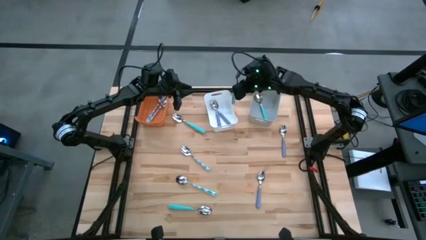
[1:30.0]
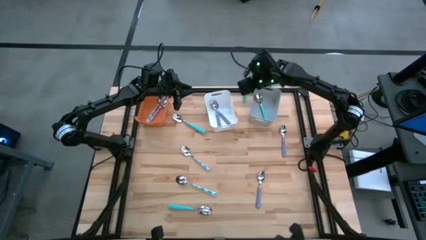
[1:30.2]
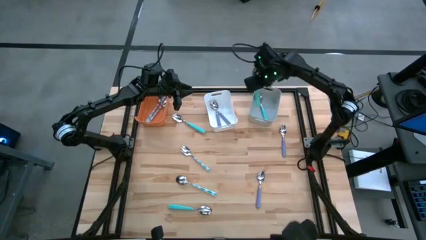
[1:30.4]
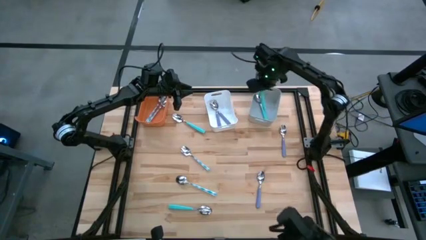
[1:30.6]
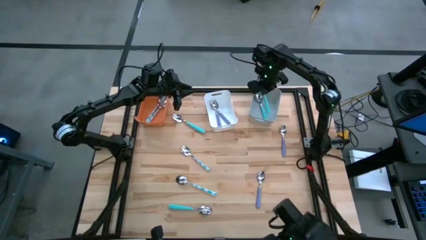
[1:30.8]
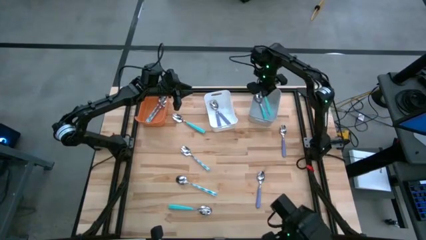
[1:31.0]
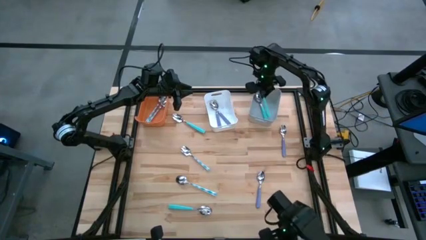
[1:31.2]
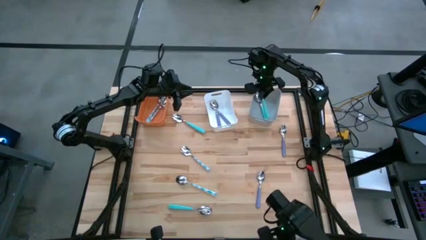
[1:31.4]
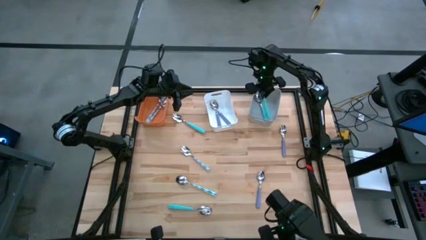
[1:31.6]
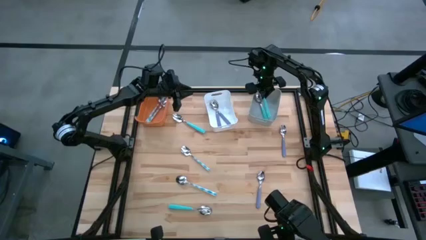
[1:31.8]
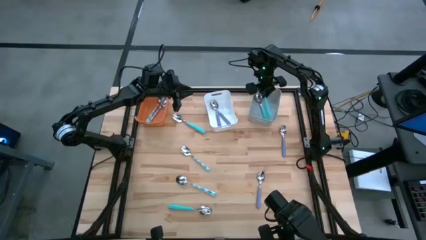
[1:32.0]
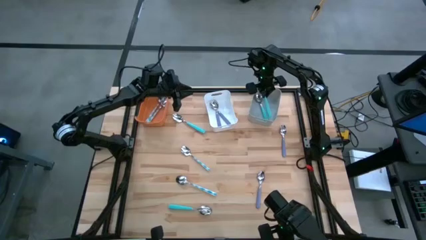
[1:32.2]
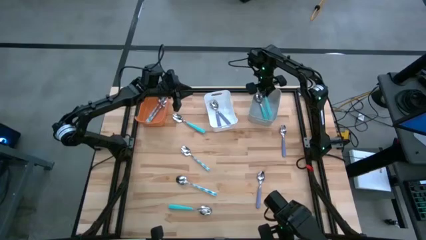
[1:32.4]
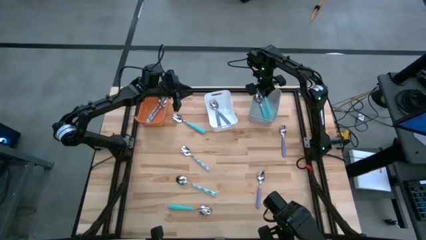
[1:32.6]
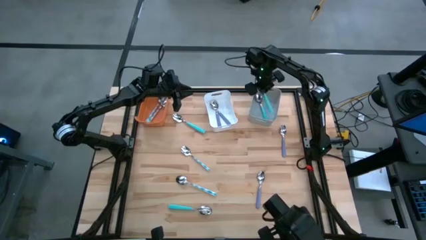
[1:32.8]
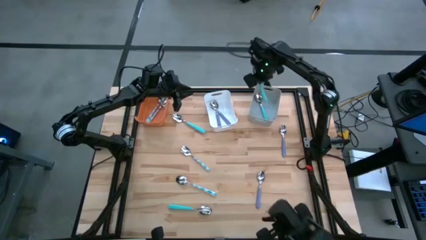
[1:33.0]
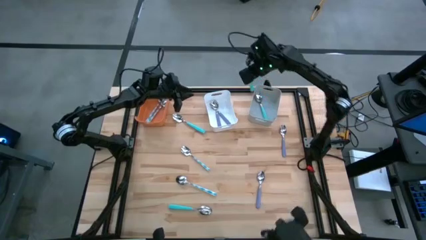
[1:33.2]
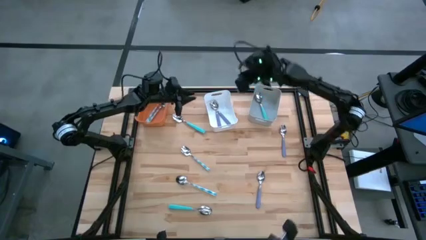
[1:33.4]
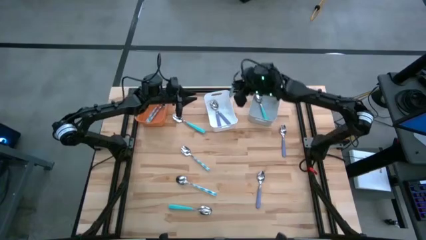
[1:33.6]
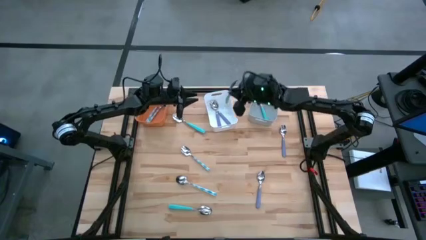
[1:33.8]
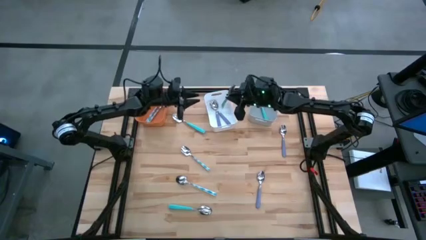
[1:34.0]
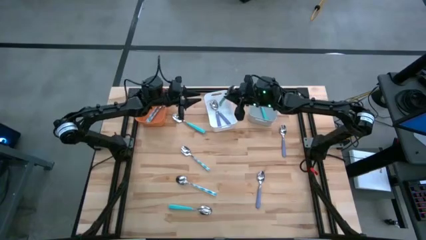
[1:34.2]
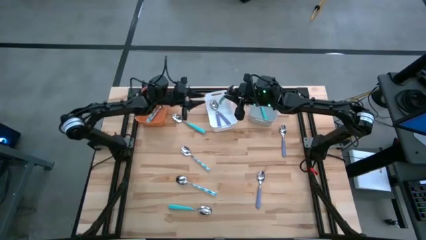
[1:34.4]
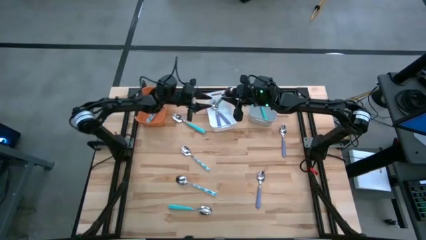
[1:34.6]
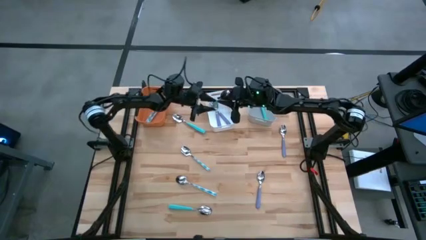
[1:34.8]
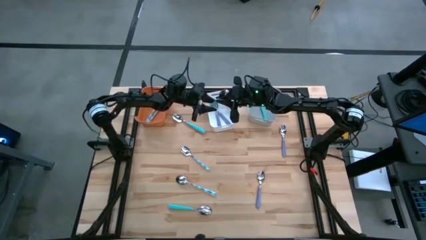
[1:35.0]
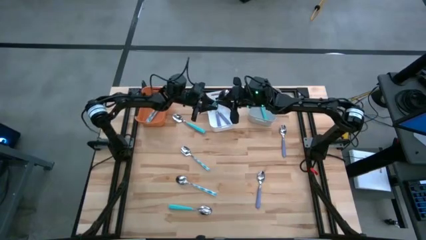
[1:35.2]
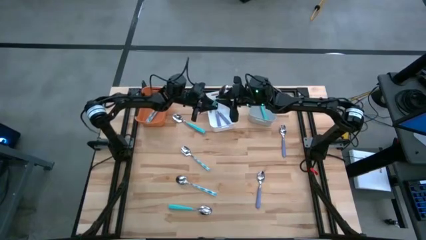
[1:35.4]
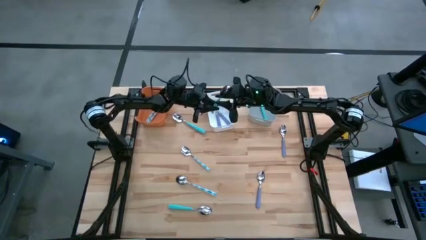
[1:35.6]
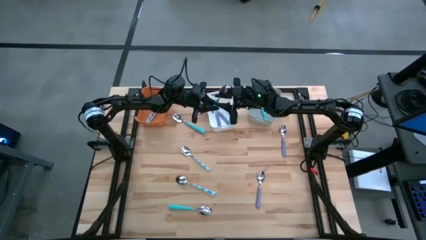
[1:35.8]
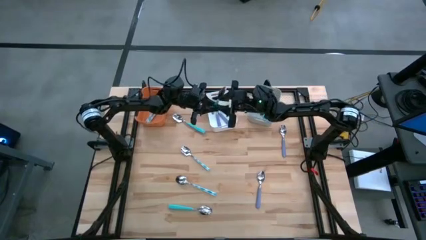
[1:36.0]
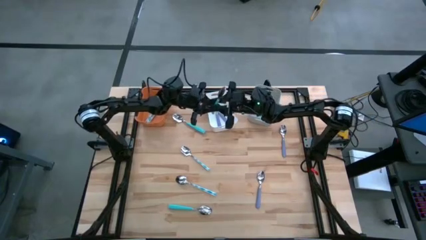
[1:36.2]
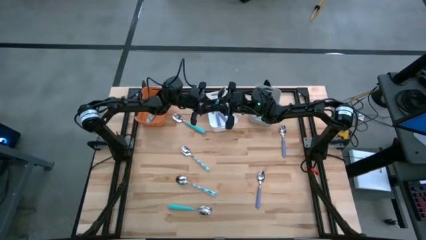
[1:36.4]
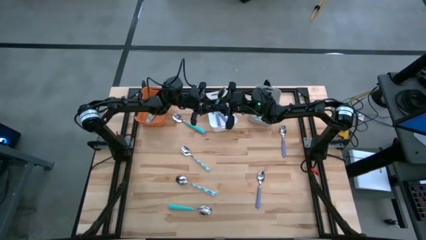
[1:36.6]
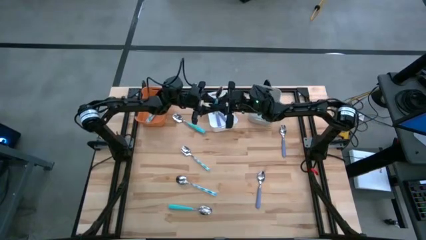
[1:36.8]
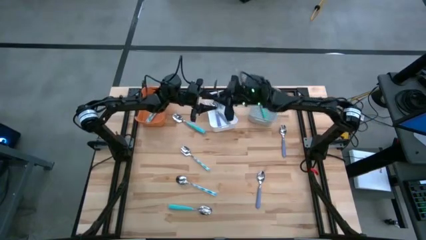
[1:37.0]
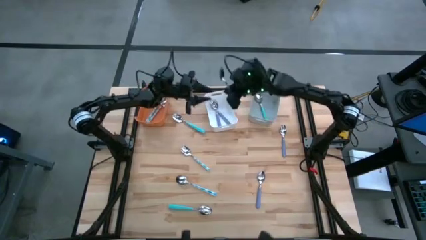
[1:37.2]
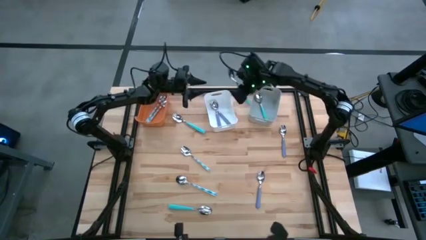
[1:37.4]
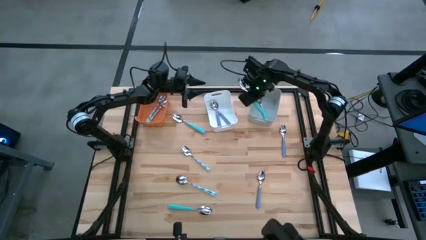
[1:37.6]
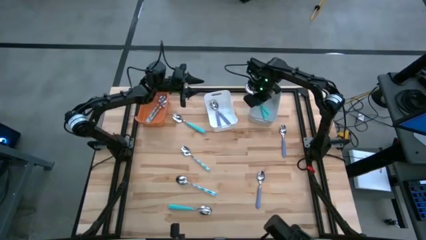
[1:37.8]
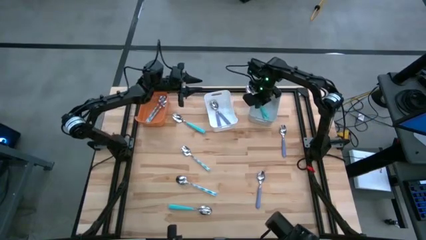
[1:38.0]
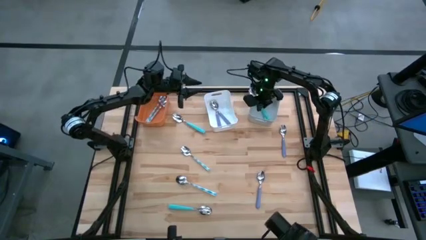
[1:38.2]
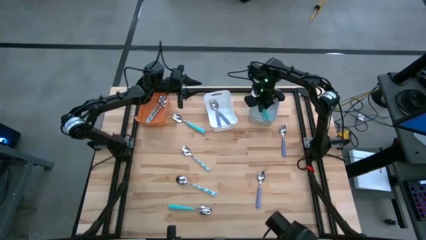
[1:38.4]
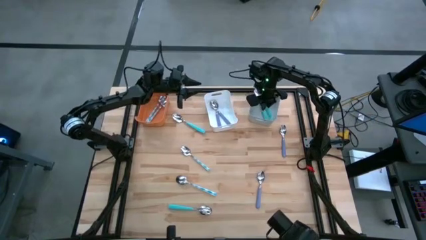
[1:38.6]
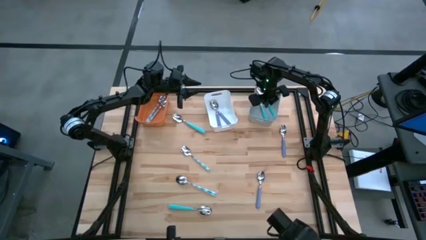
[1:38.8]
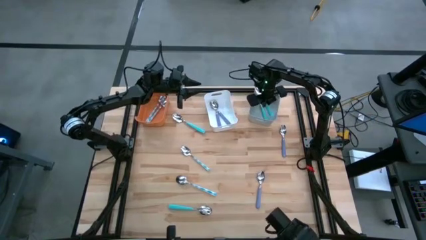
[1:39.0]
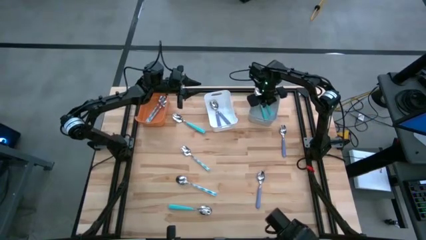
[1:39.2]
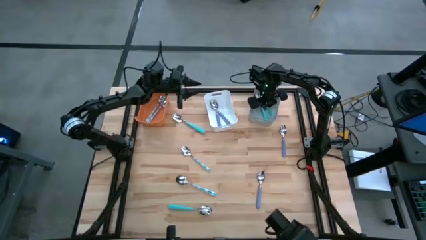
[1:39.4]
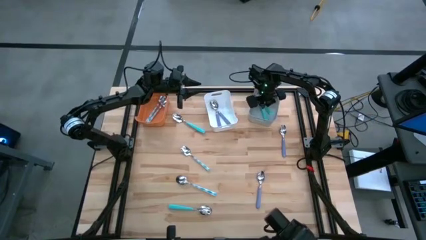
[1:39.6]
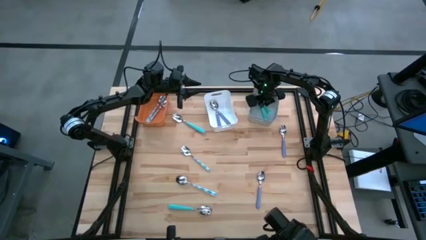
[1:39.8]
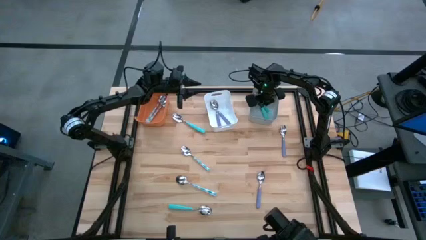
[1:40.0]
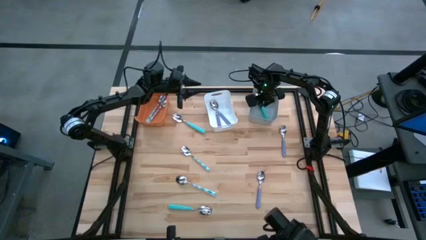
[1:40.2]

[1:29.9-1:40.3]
Task: Sort silverware by color (type)
Put the blue spoon into the gray bin

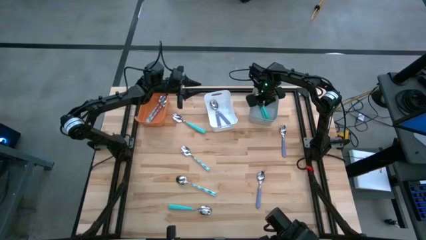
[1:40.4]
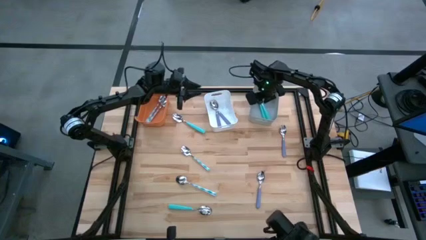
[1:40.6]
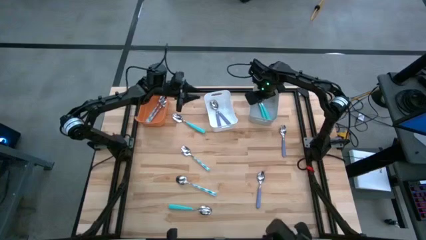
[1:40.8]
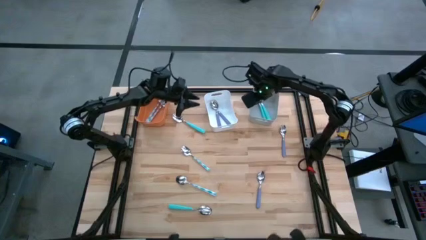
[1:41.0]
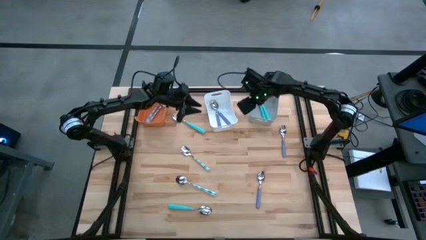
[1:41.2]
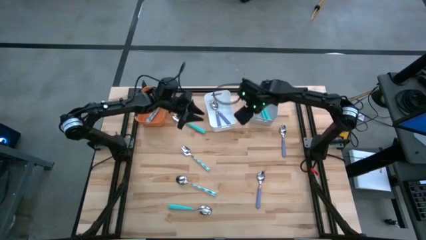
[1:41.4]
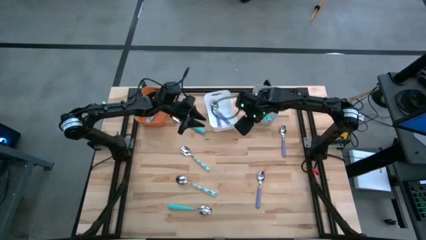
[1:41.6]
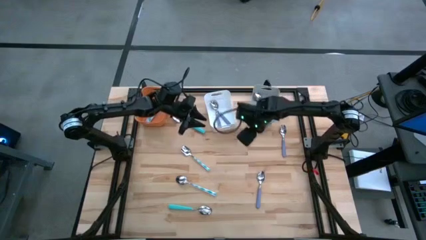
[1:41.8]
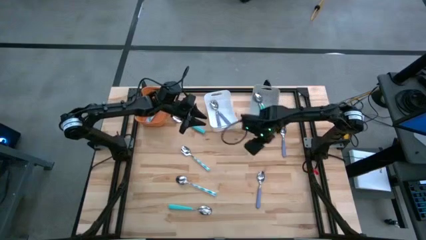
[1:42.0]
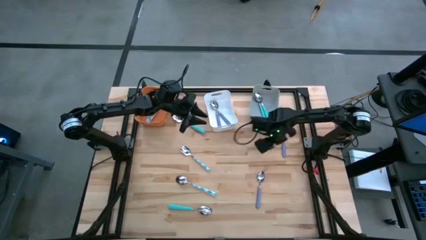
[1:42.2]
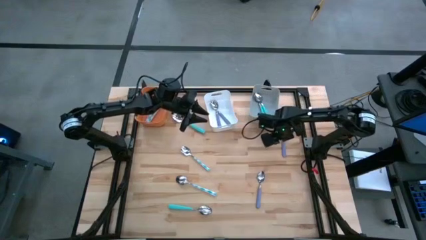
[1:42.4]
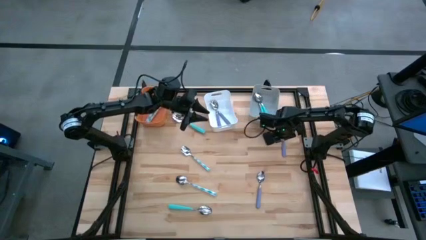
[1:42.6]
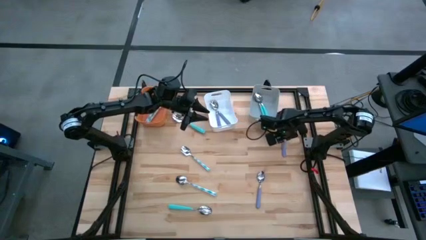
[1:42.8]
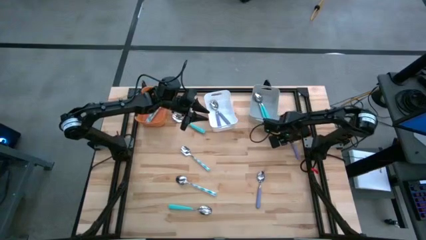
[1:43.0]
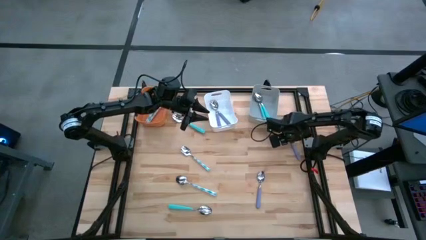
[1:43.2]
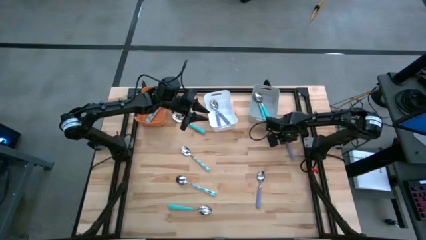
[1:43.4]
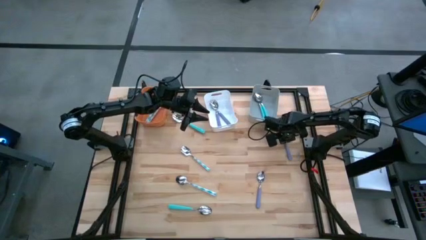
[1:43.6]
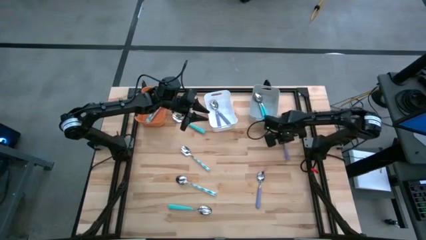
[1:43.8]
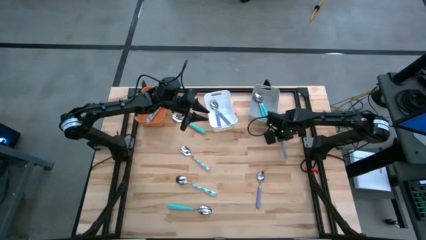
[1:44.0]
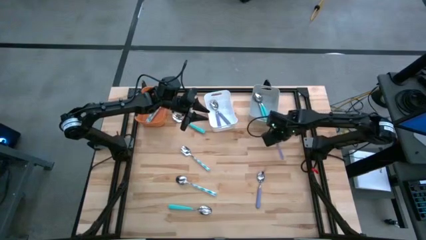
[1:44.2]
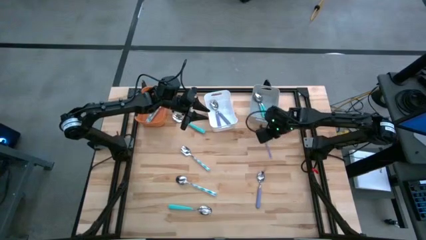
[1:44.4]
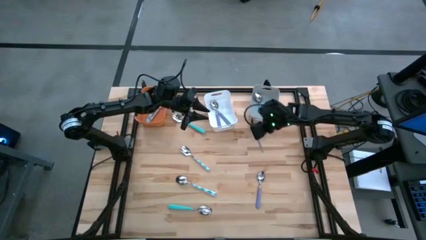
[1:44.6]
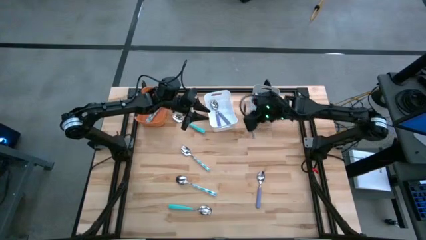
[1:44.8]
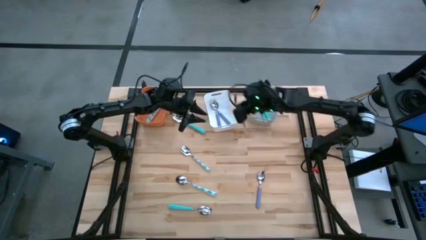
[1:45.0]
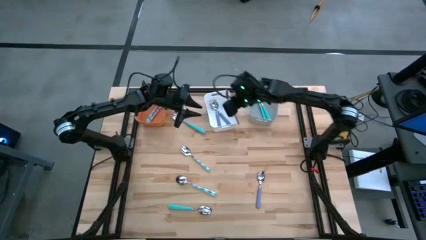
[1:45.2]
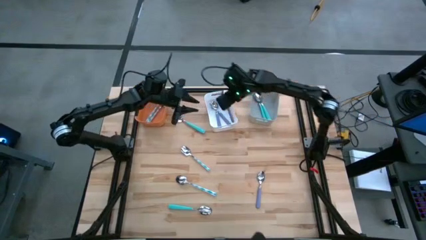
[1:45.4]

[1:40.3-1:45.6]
Put the purple spoon into the white bin
